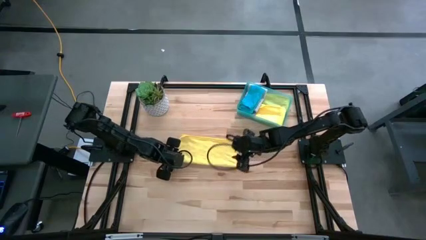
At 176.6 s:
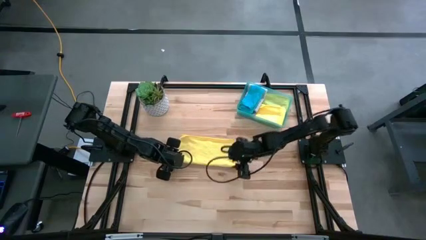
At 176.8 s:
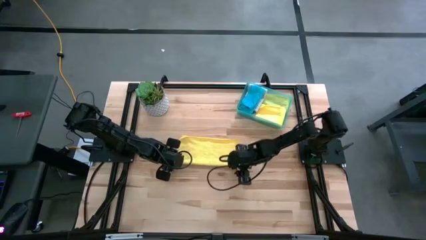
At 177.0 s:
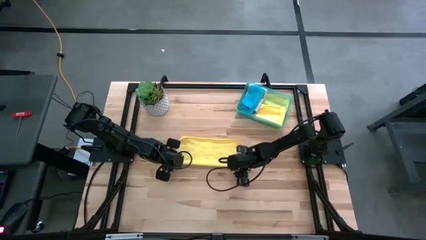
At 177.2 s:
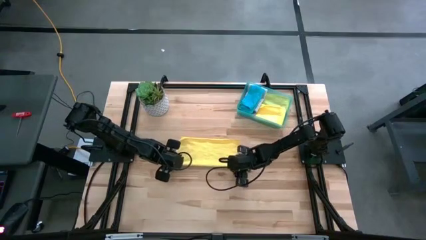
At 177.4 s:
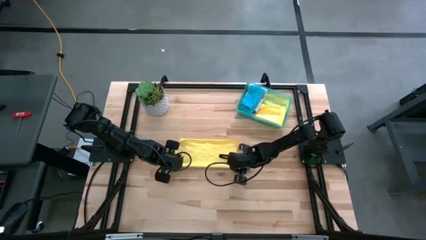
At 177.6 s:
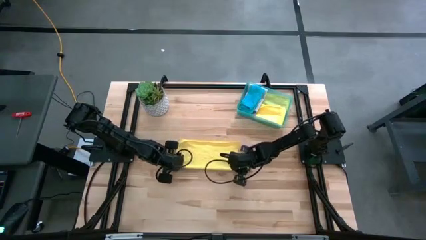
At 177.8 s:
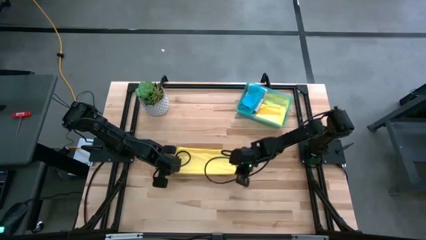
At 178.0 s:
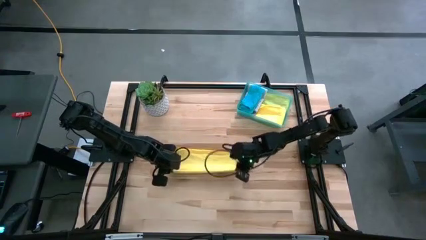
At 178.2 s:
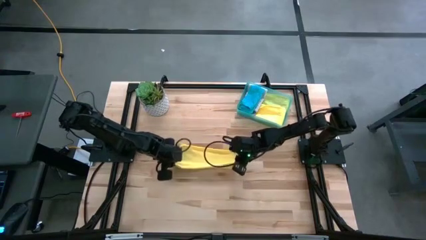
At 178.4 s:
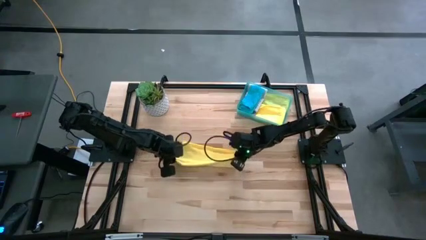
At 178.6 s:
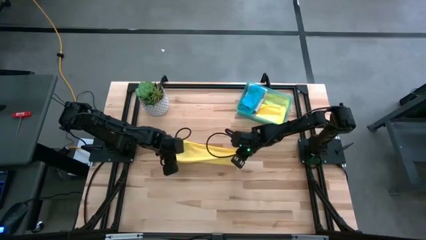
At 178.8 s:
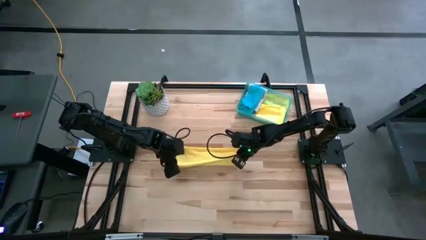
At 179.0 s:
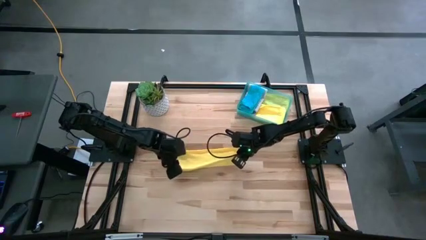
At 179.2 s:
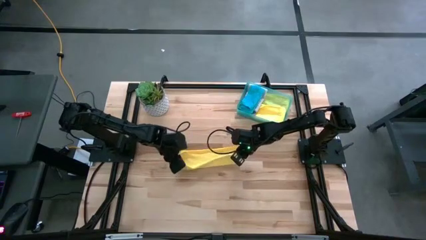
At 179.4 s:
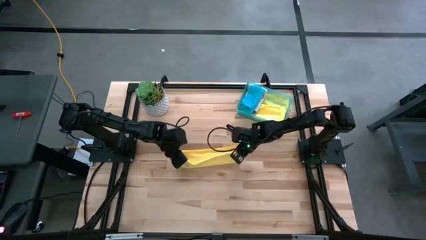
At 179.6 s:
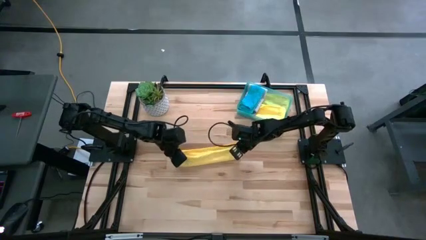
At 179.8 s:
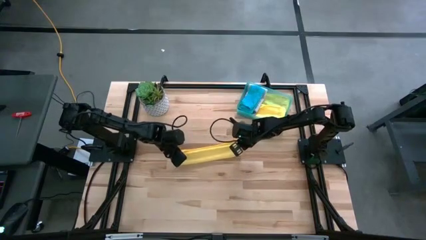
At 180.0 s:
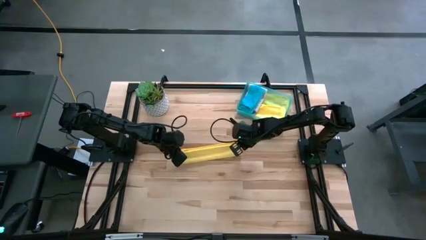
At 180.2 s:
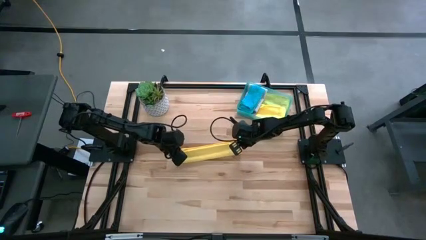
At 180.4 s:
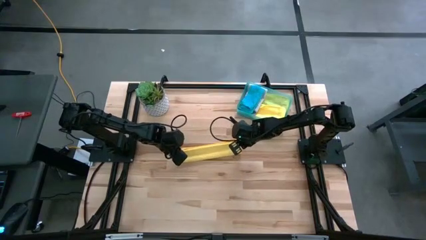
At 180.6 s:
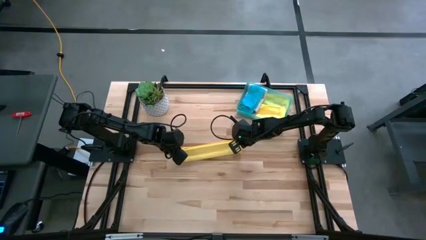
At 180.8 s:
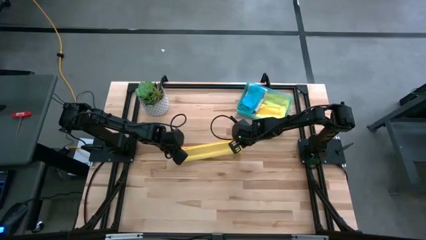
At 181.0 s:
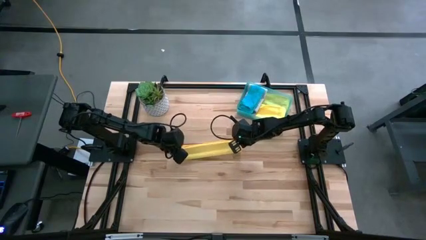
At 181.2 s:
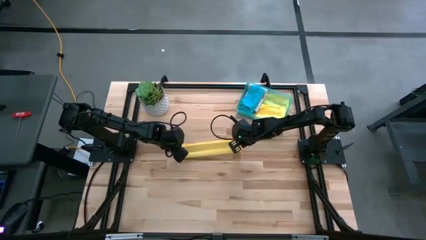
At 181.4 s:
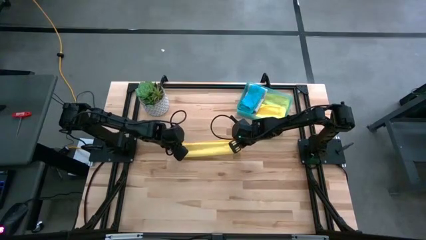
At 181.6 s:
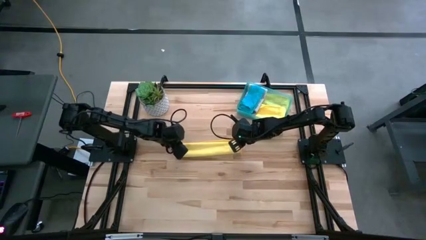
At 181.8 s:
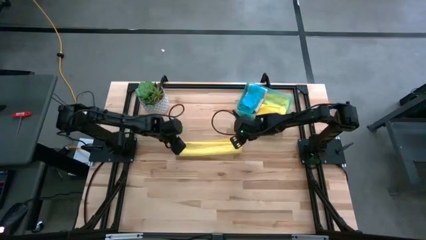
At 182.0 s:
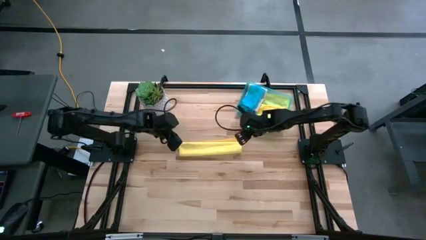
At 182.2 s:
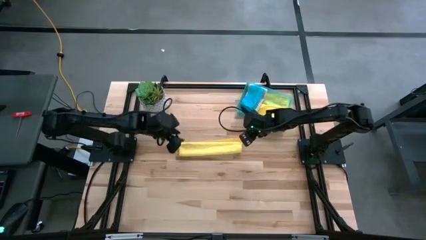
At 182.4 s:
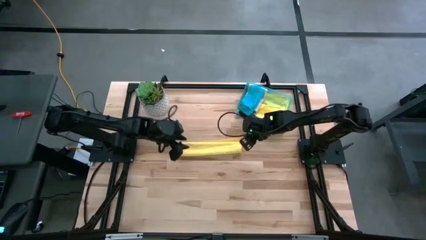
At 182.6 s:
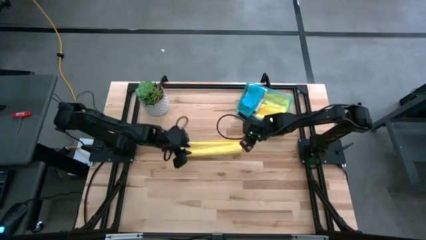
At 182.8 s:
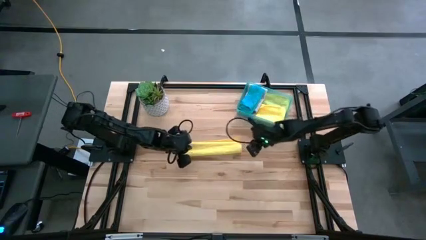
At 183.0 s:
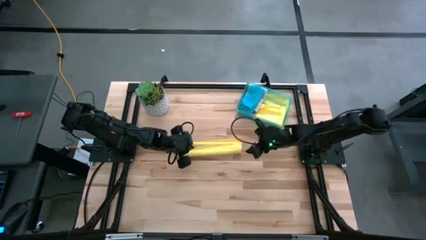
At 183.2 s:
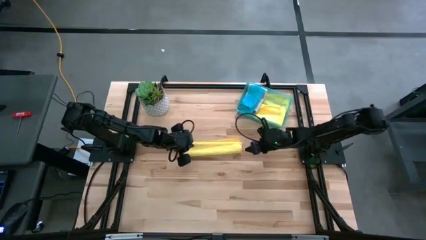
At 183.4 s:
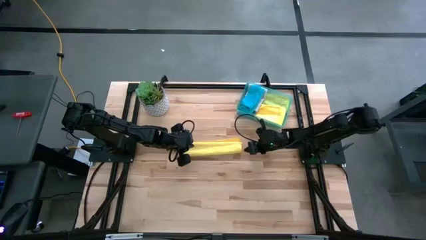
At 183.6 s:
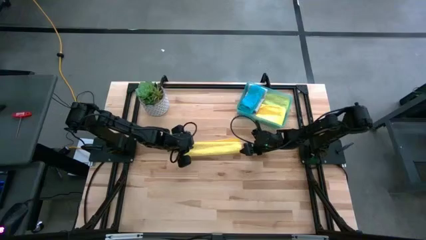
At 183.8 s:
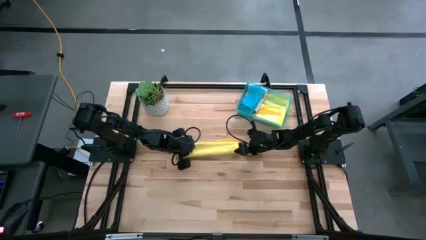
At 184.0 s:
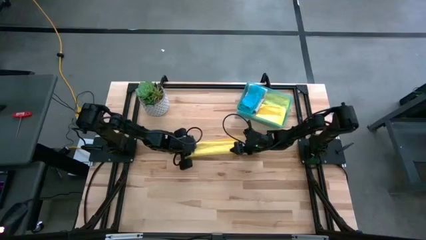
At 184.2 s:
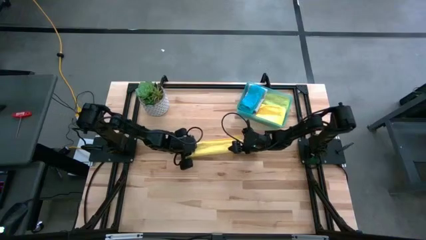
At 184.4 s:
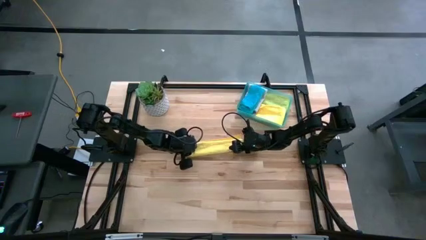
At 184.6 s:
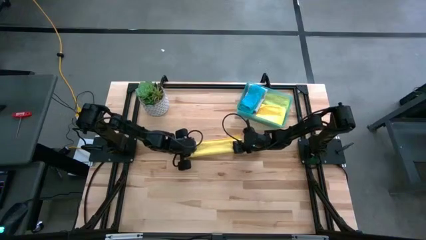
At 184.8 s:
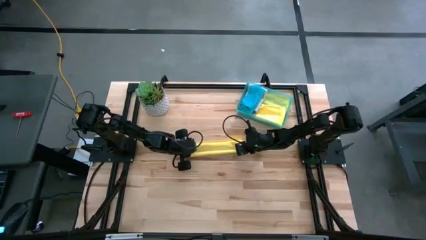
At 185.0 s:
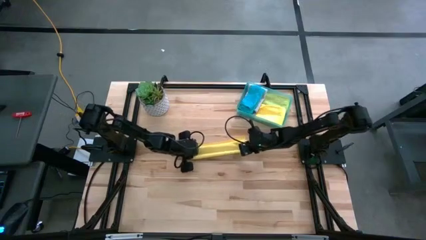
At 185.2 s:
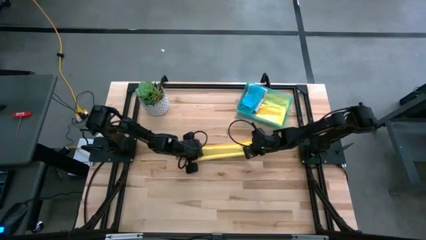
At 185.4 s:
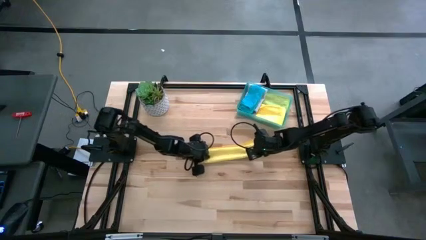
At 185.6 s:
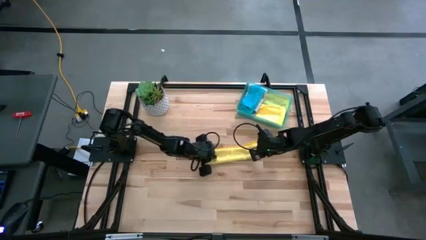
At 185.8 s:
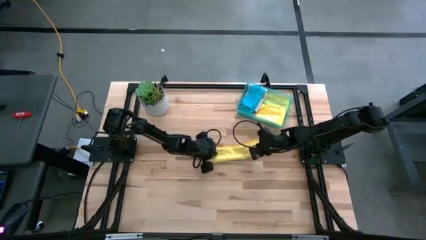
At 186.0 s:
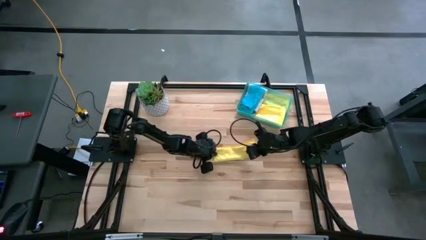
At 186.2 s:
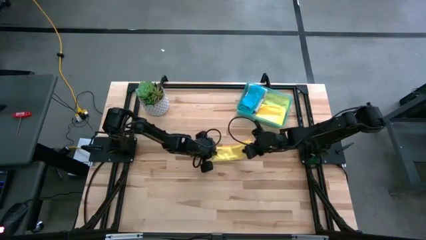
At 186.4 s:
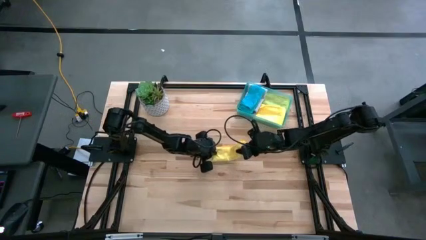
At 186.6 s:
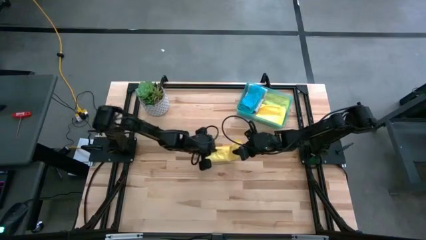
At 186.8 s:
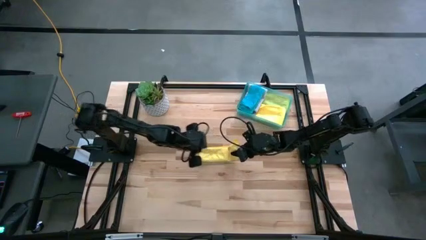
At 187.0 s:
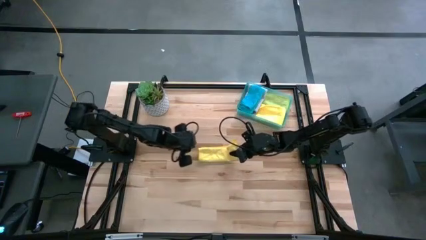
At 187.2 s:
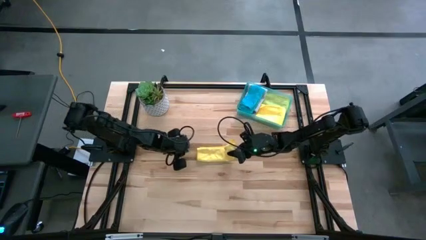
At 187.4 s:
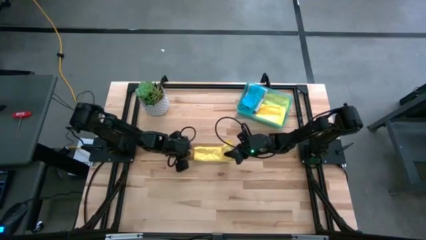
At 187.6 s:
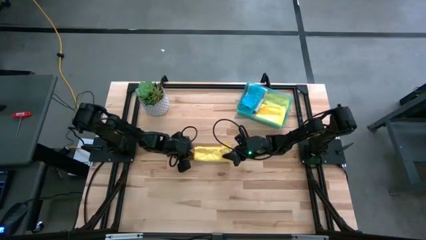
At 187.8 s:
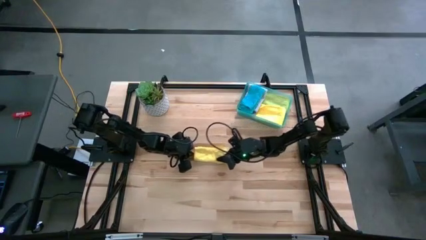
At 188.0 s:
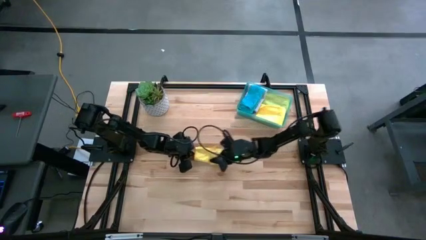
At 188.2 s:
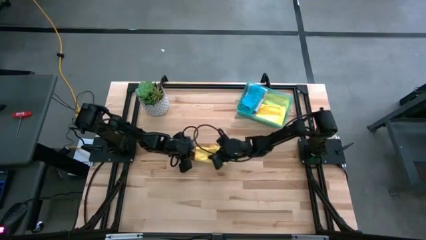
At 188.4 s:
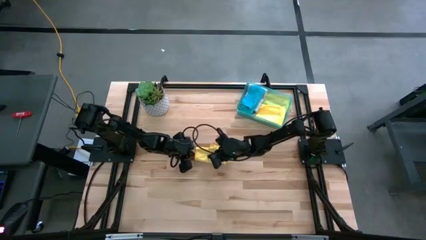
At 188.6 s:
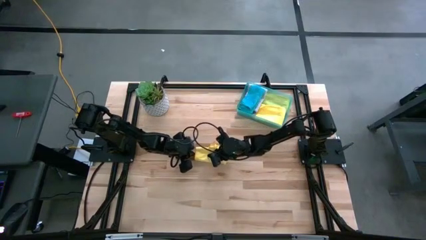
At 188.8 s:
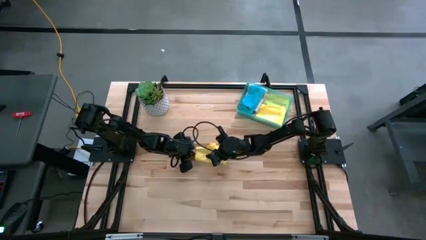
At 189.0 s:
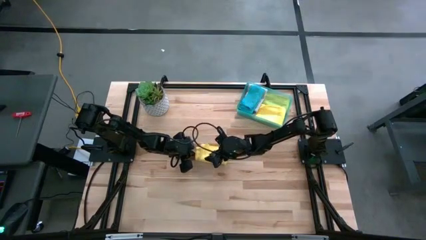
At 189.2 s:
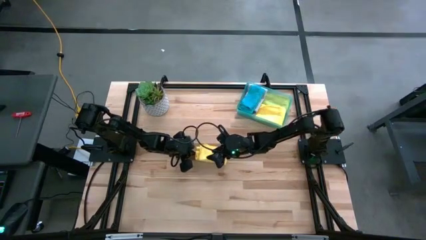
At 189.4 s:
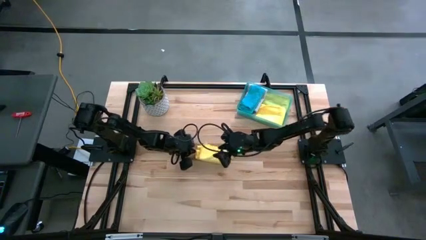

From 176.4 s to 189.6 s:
Task: Fold microfiber towels
Fold the yellow towel
